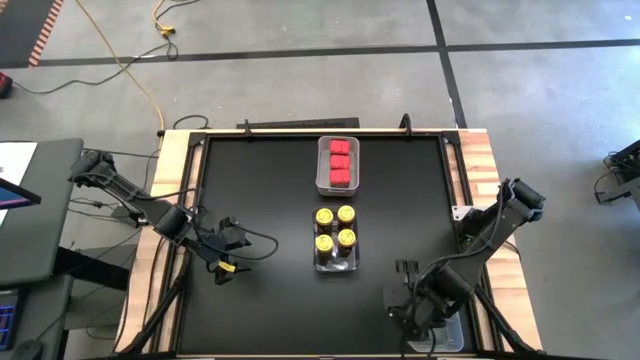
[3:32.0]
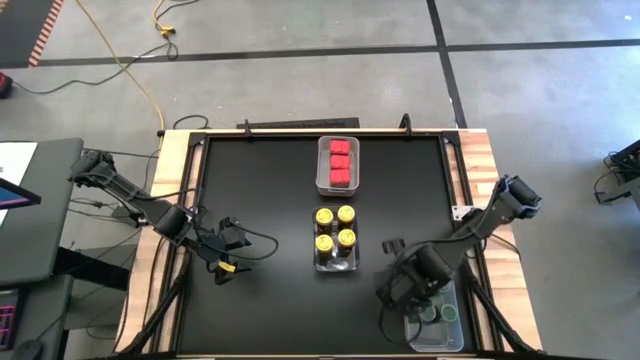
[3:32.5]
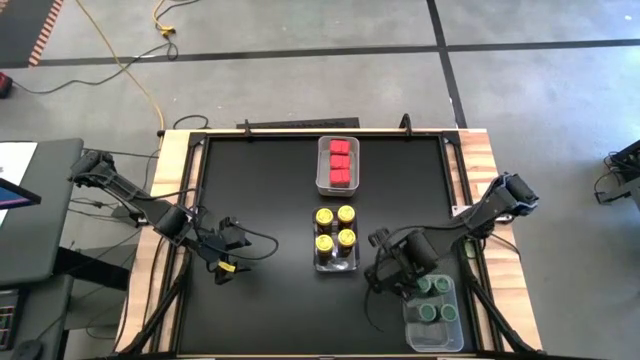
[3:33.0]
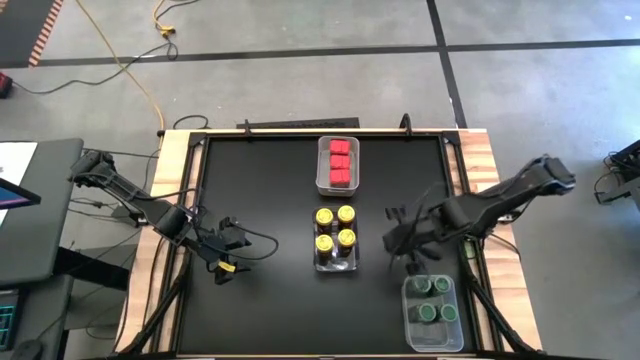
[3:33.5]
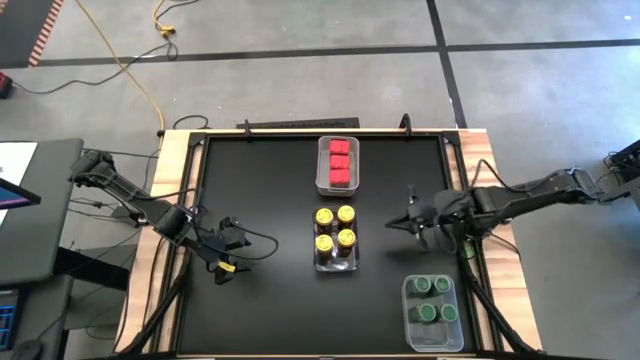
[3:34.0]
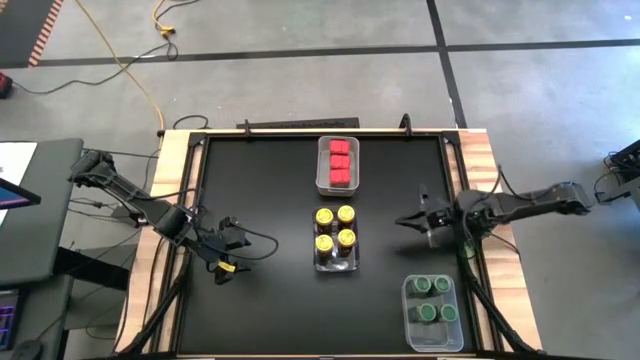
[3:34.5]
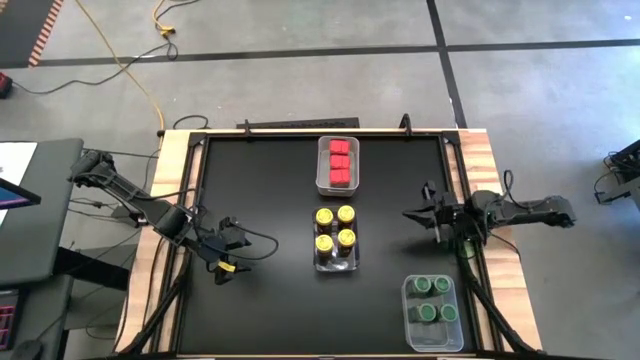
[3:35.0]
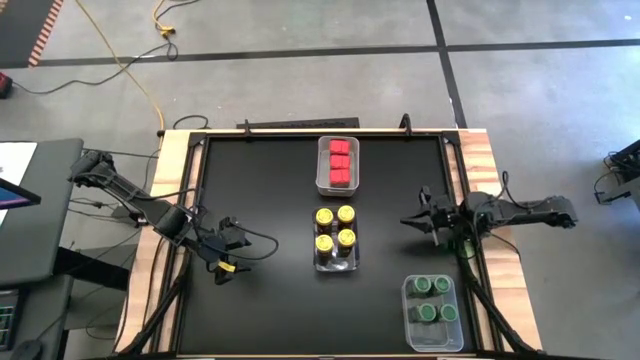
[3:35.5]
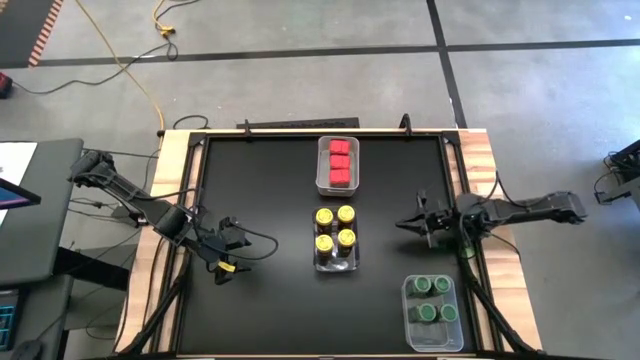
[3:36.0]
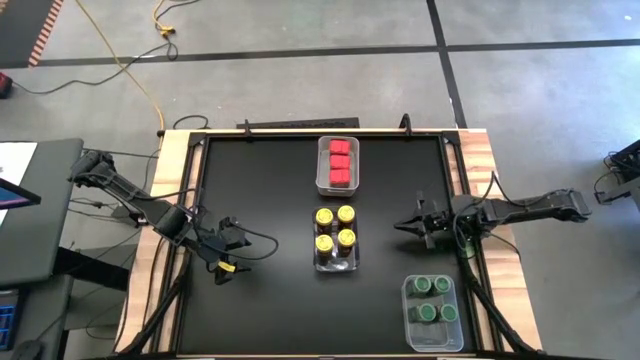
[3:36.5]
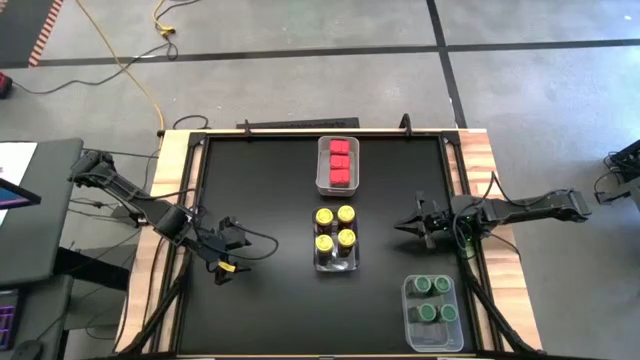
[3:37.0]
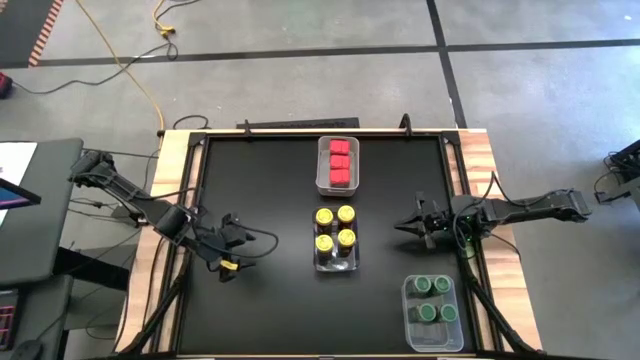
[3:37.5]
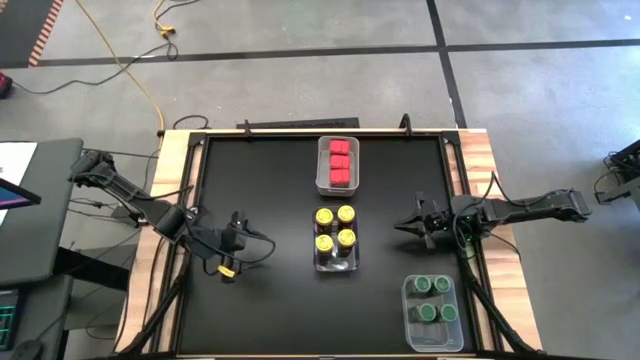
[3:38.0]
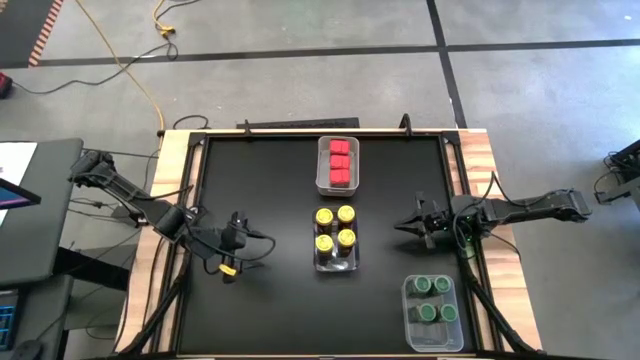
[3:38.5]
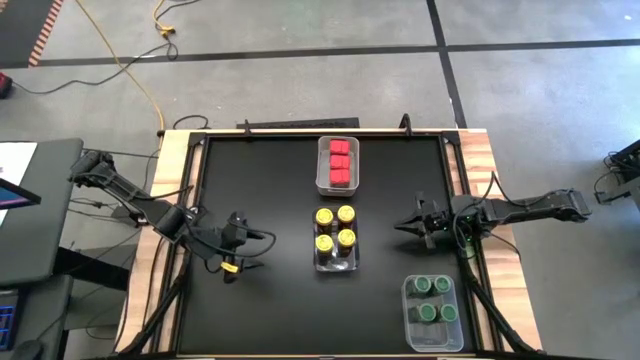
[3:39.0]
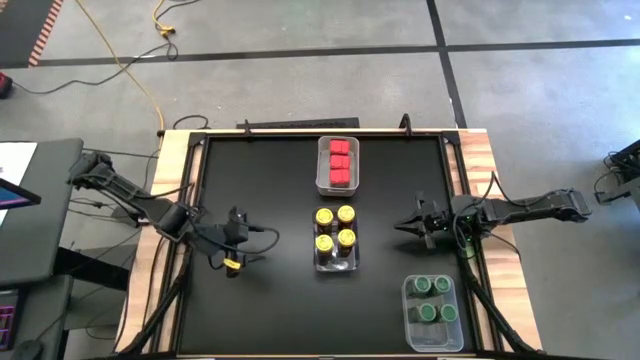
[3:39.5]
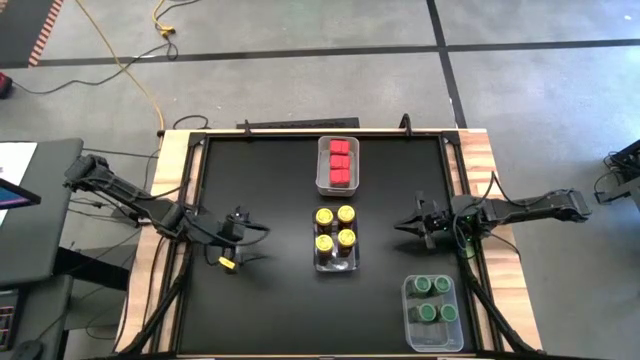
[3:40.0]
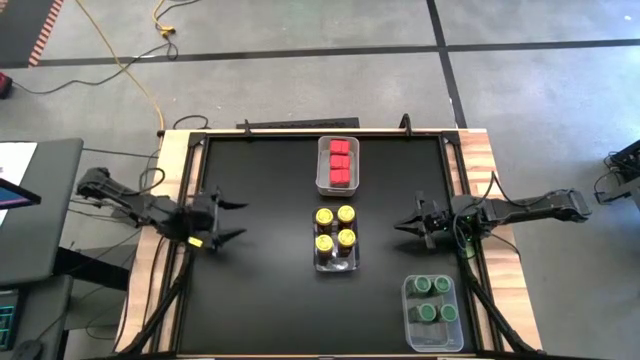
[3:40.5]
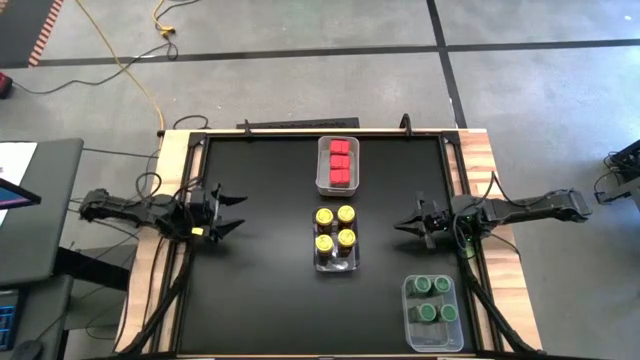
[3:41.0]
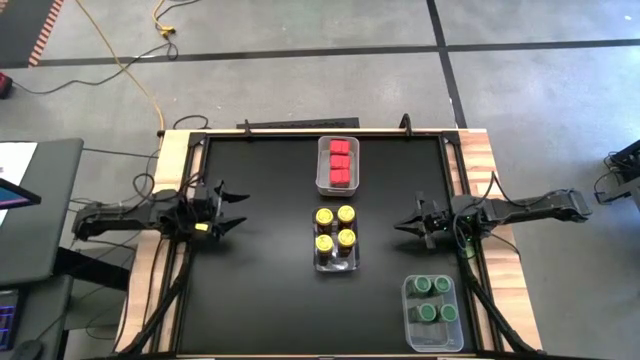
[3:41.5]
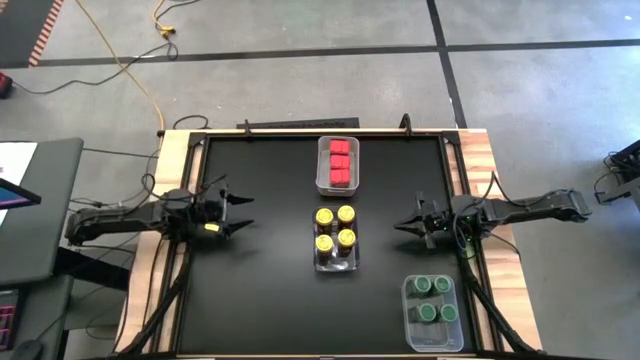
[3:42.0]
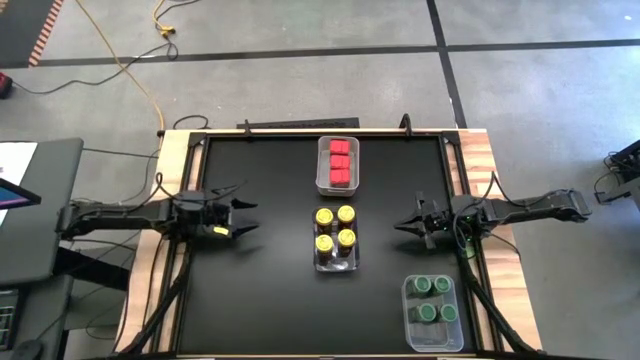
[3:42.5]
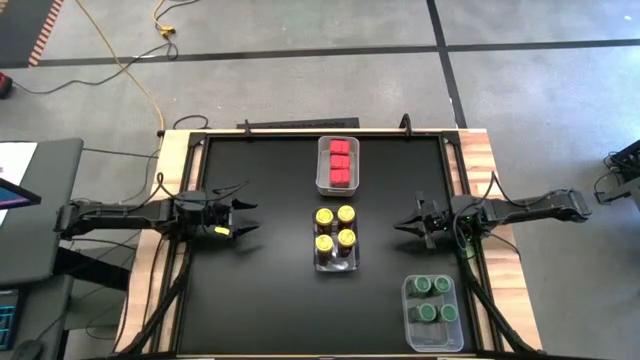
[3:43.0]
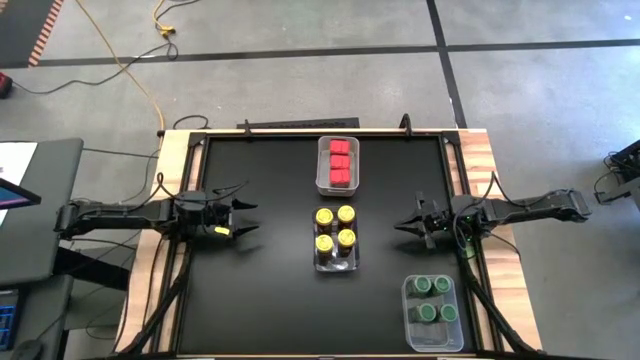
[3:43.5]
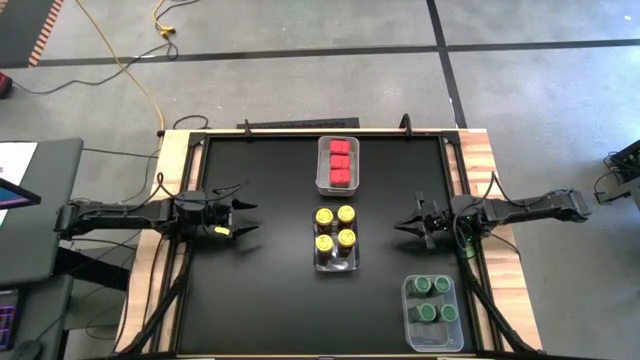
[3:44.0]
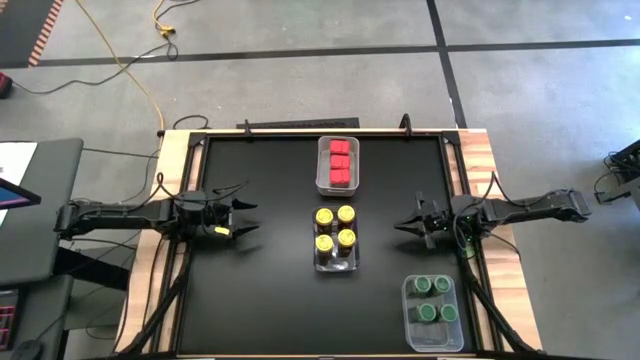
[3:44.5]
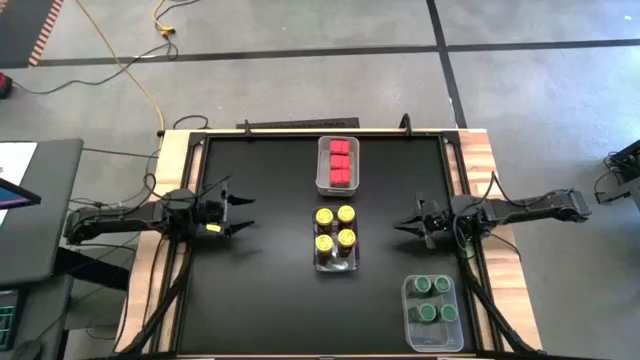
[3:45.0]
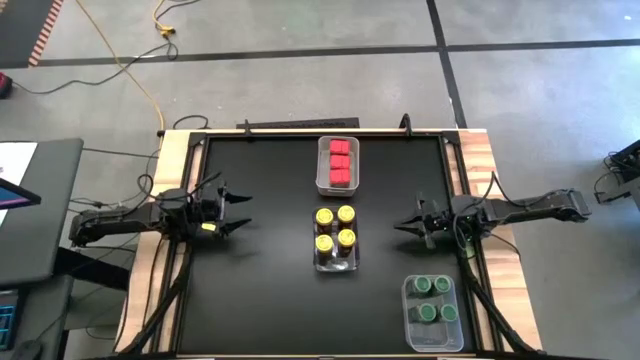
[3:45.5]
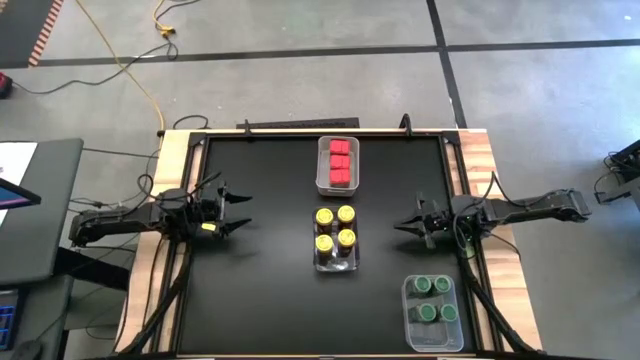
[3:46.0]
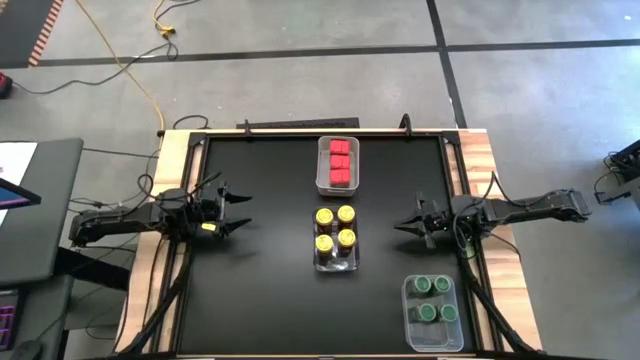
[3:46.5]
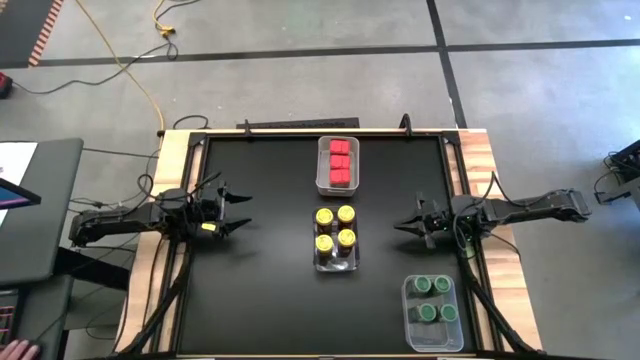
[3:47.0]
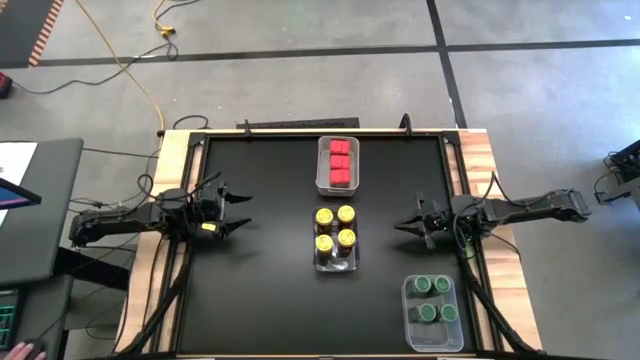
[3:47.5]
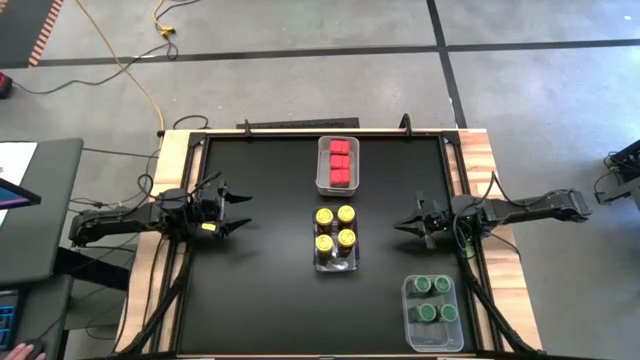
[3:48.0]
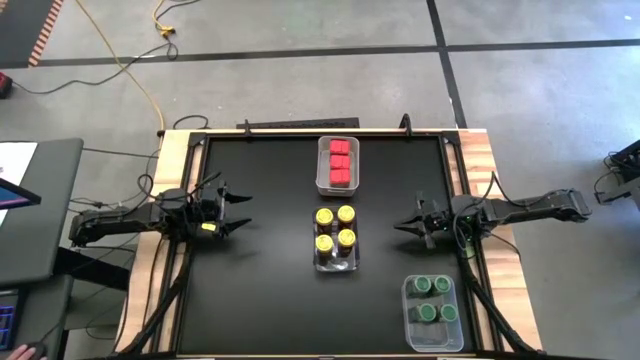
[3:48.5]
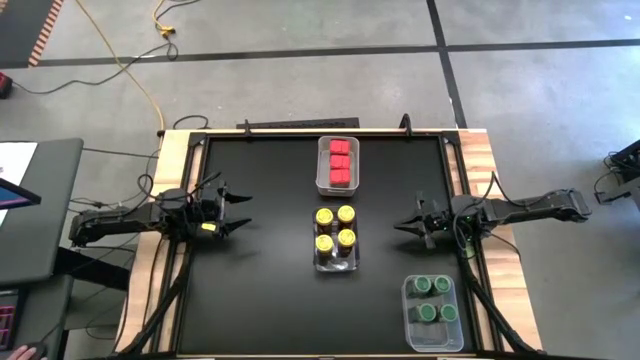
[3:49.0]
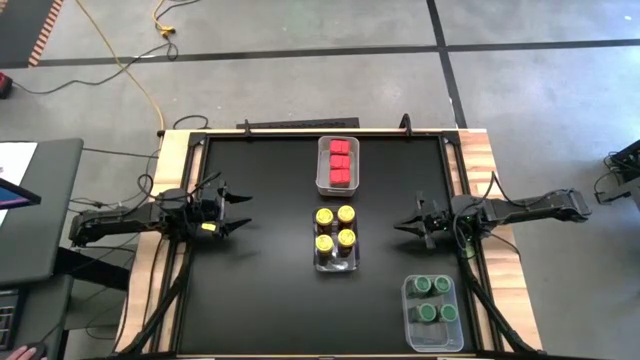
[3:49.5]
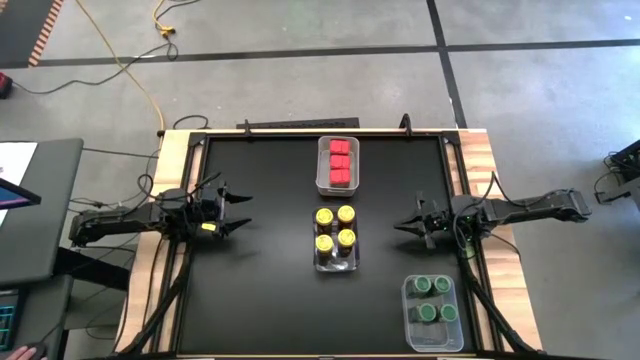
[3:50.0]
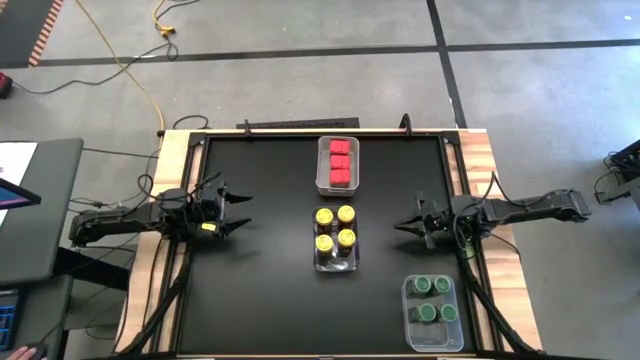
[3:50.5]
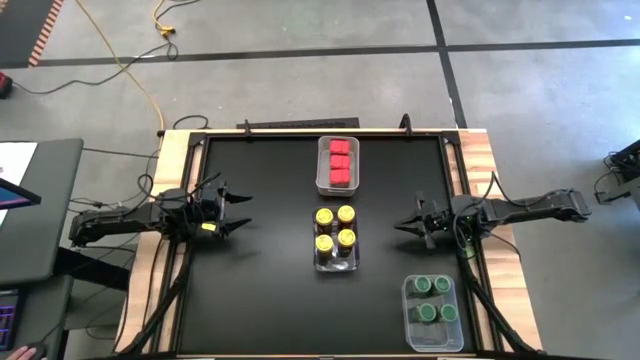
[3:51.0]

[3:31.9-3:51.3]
Task: Sort spices by type
Return to Home Position
